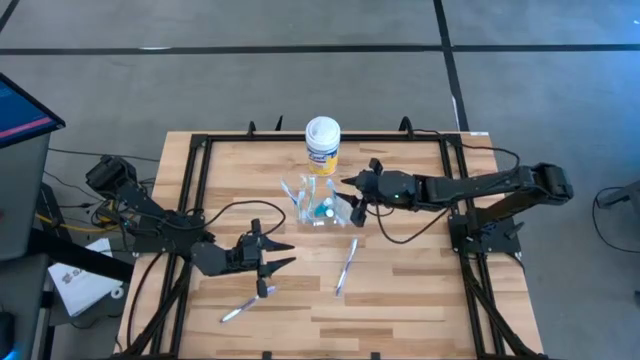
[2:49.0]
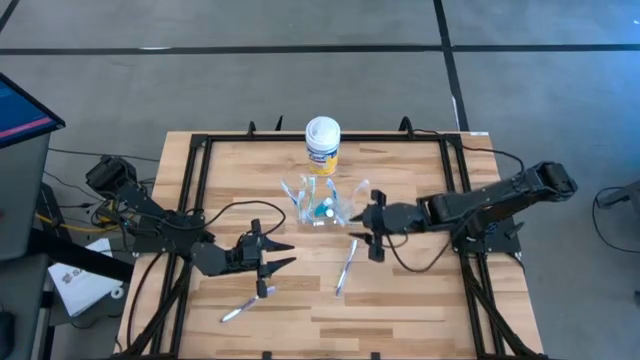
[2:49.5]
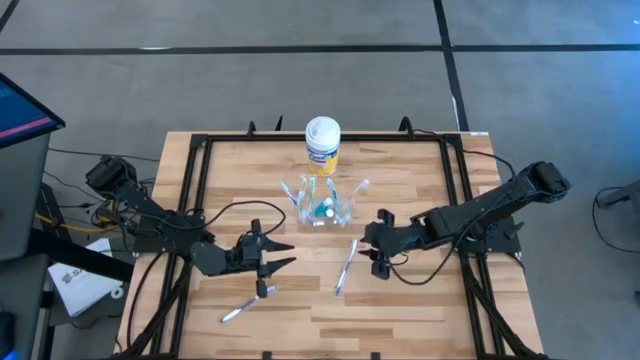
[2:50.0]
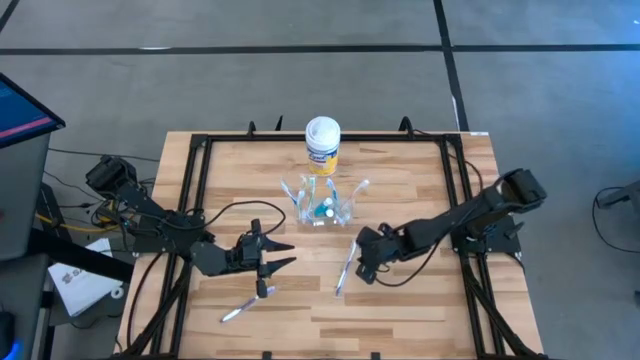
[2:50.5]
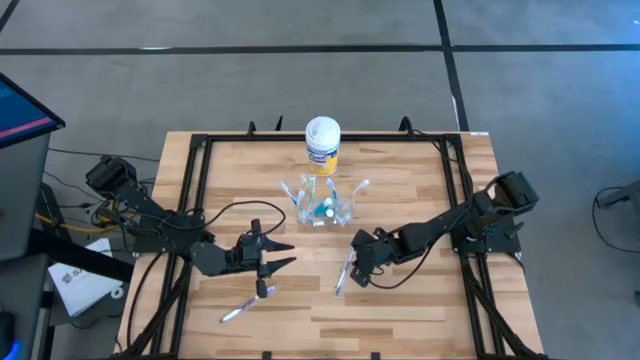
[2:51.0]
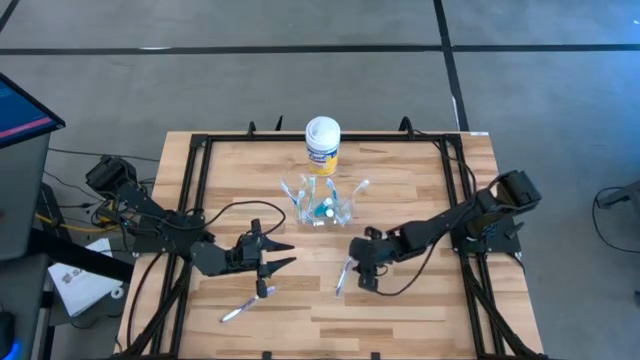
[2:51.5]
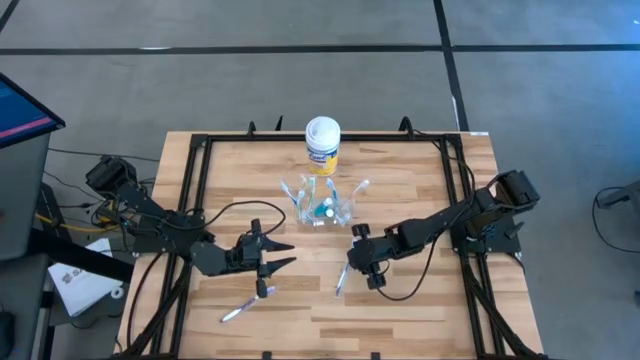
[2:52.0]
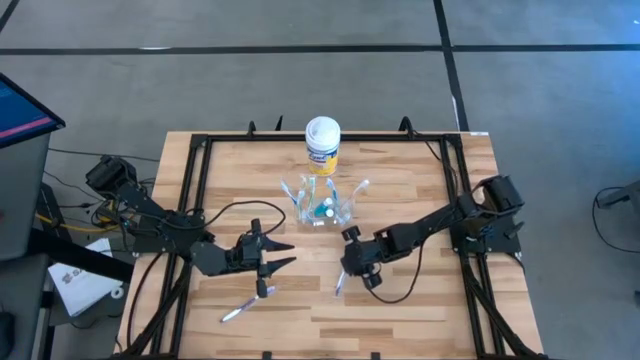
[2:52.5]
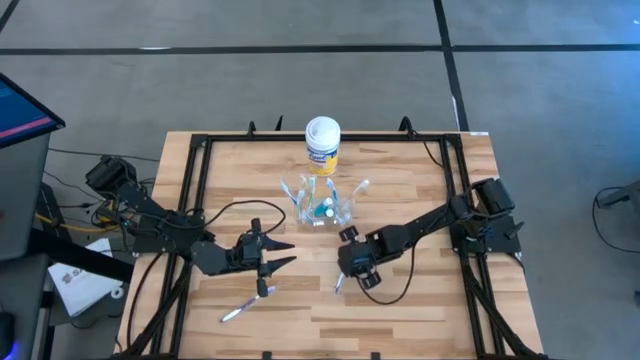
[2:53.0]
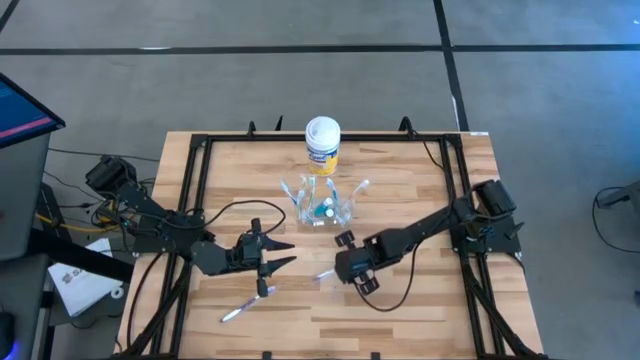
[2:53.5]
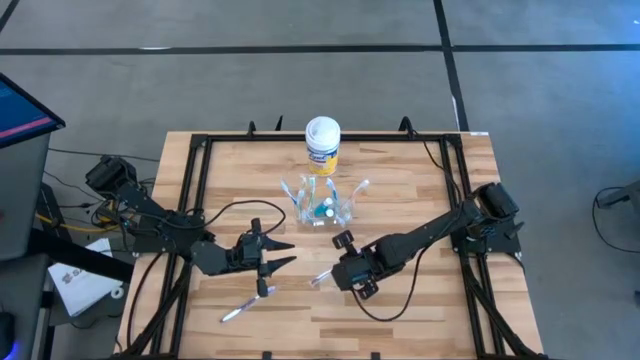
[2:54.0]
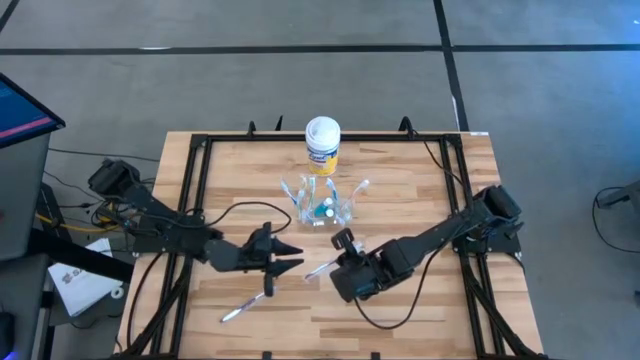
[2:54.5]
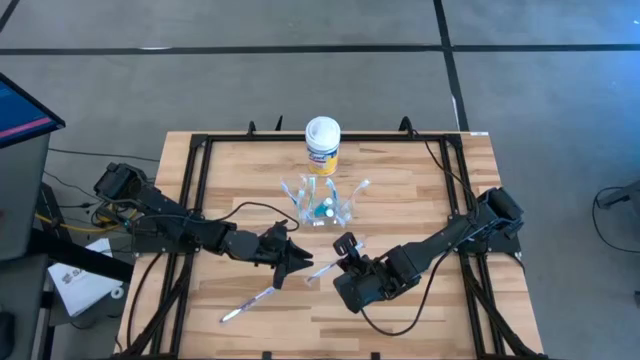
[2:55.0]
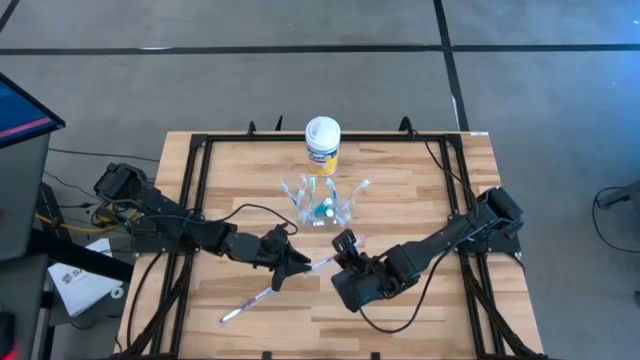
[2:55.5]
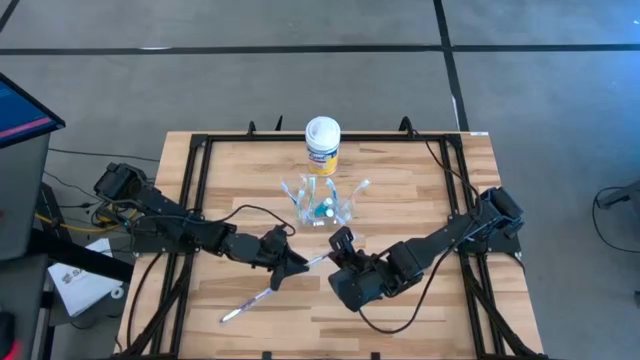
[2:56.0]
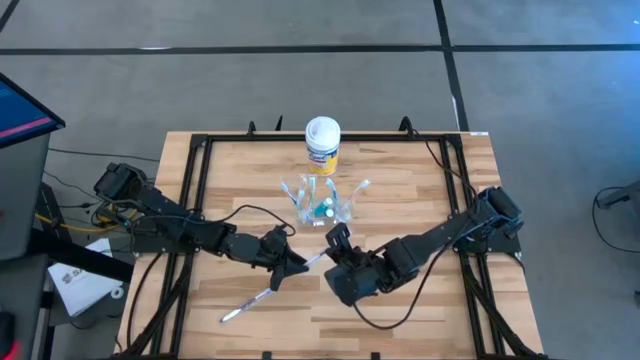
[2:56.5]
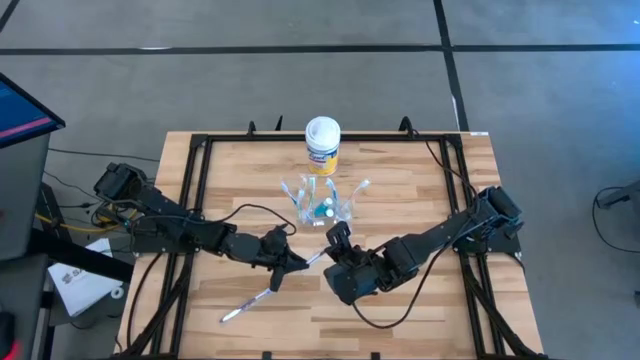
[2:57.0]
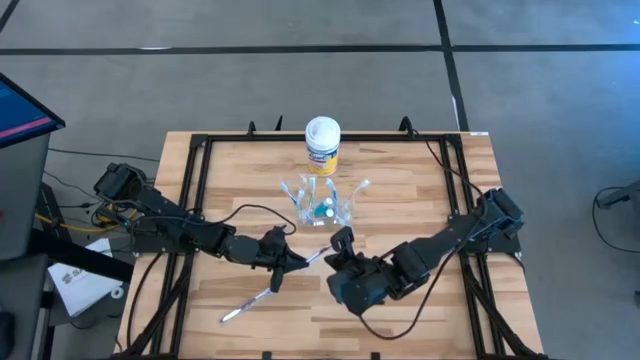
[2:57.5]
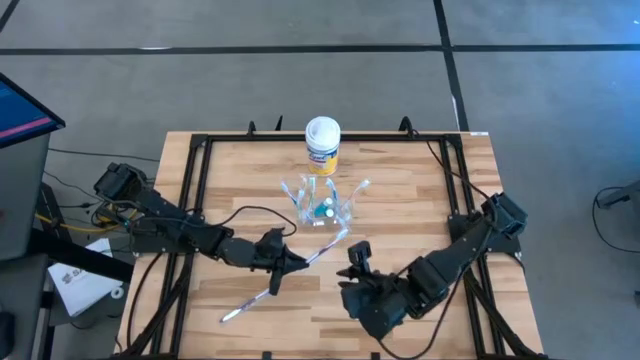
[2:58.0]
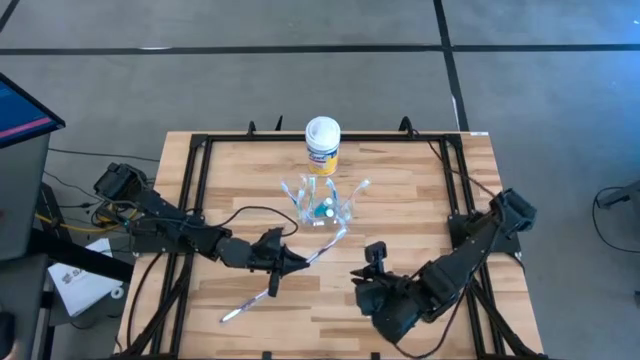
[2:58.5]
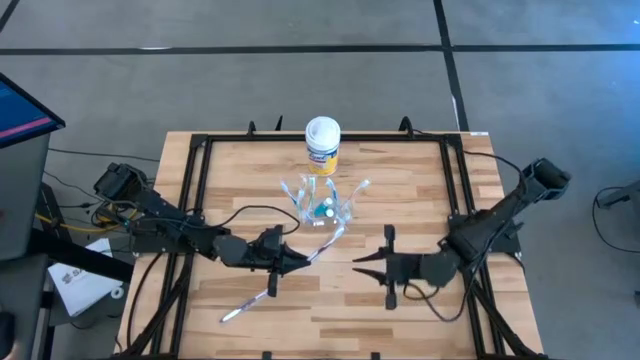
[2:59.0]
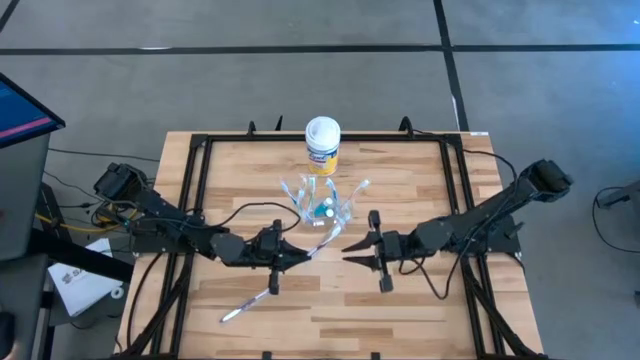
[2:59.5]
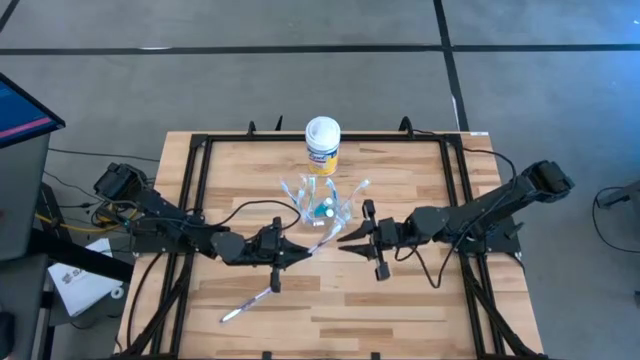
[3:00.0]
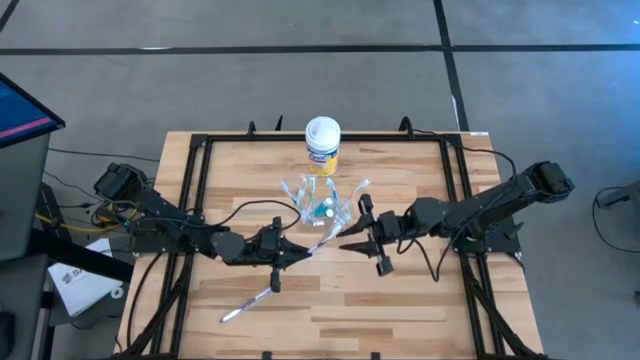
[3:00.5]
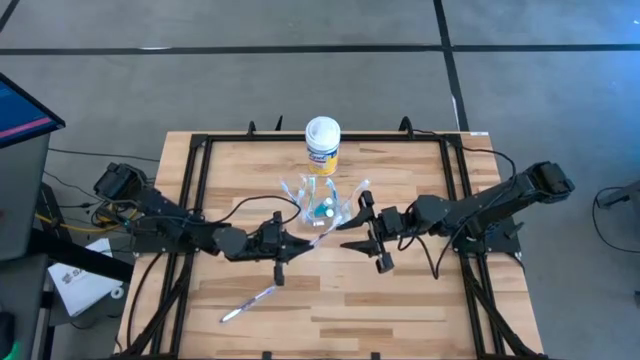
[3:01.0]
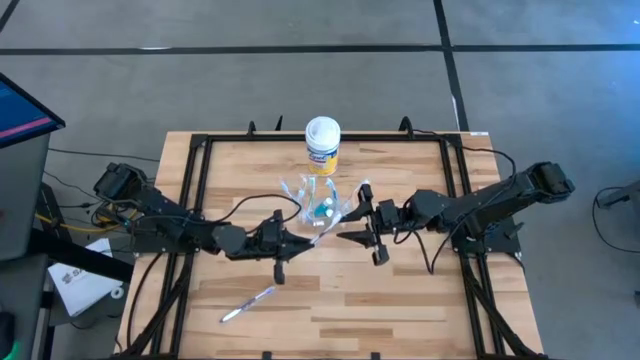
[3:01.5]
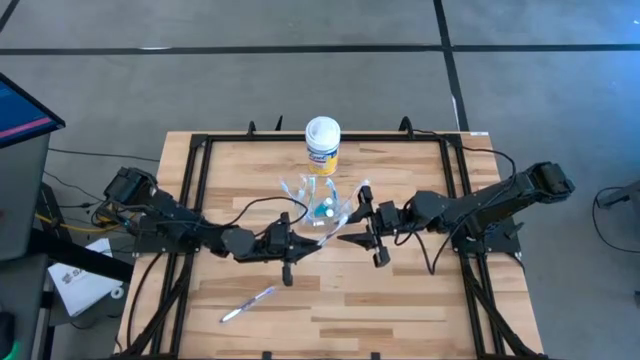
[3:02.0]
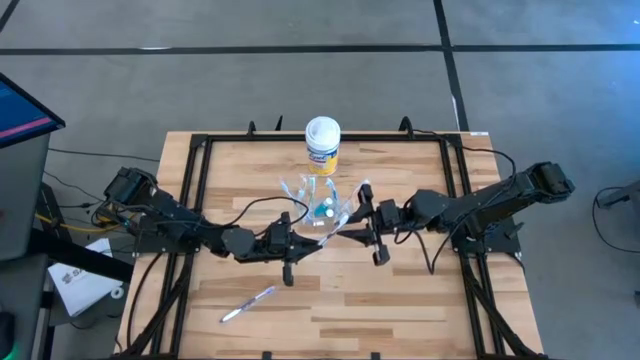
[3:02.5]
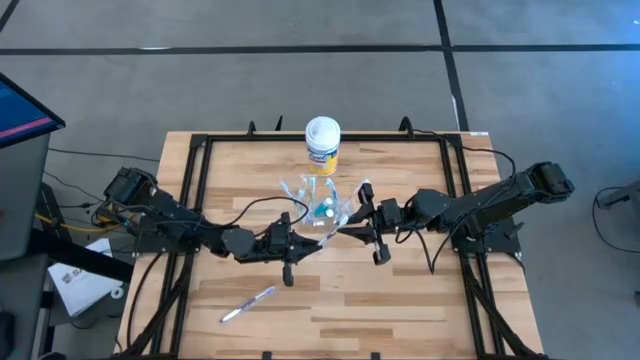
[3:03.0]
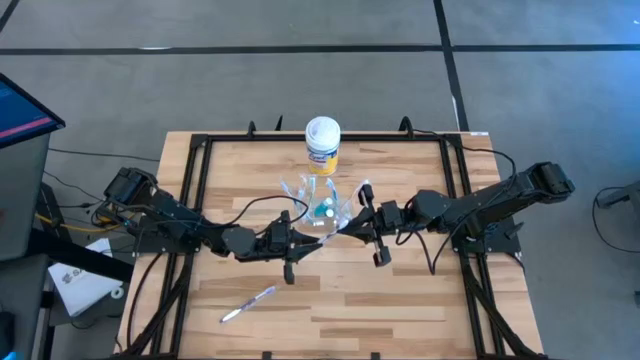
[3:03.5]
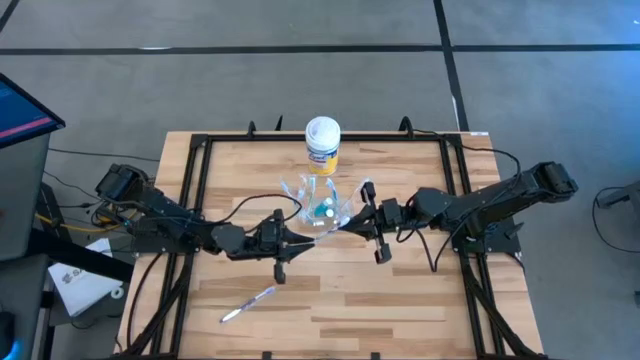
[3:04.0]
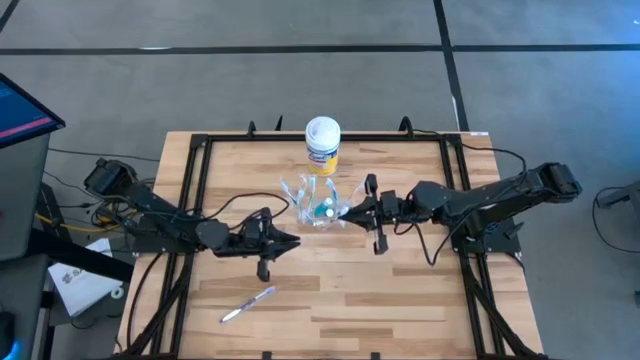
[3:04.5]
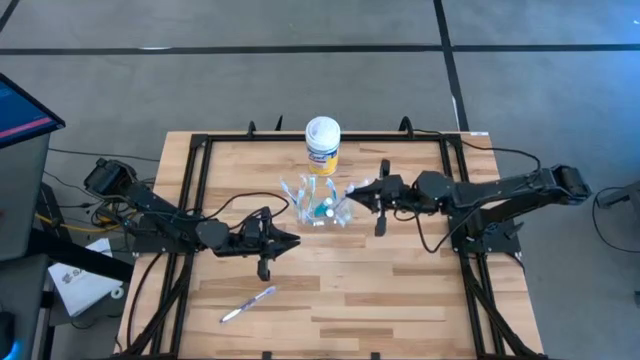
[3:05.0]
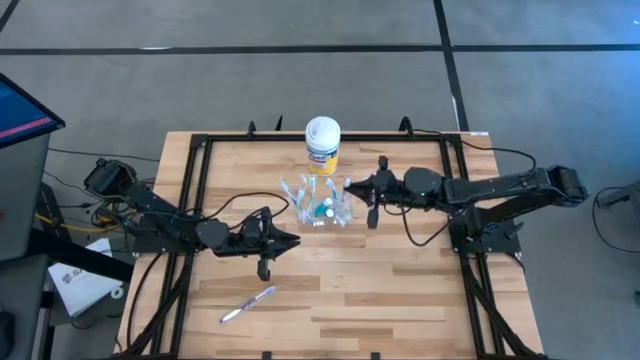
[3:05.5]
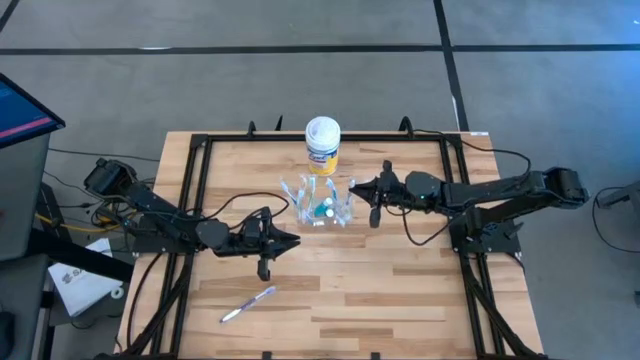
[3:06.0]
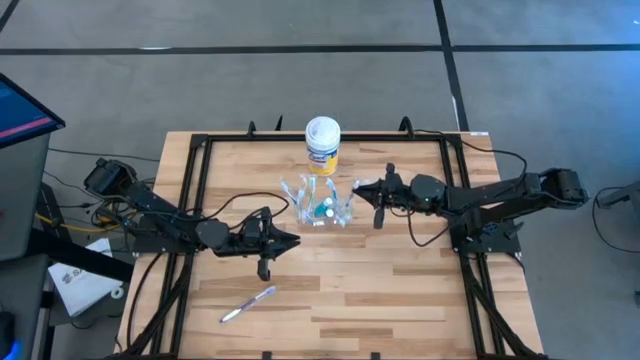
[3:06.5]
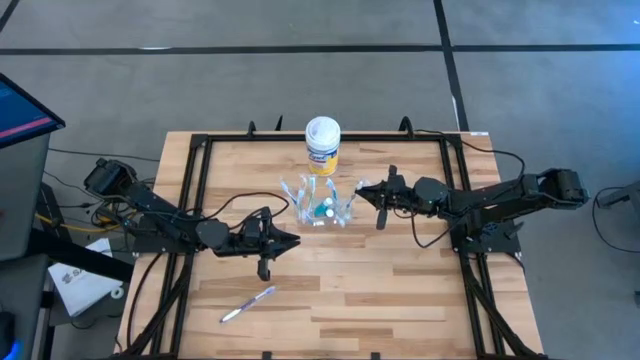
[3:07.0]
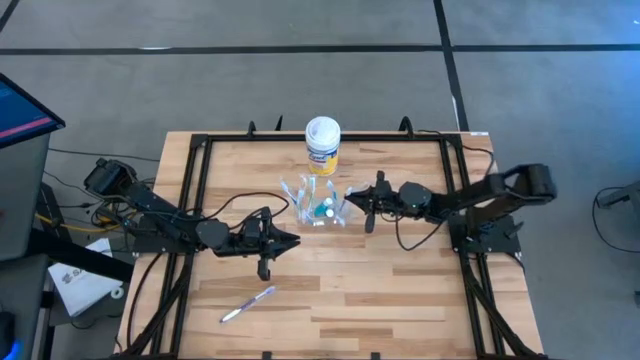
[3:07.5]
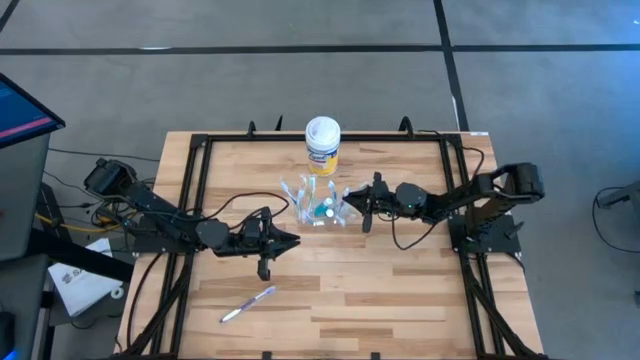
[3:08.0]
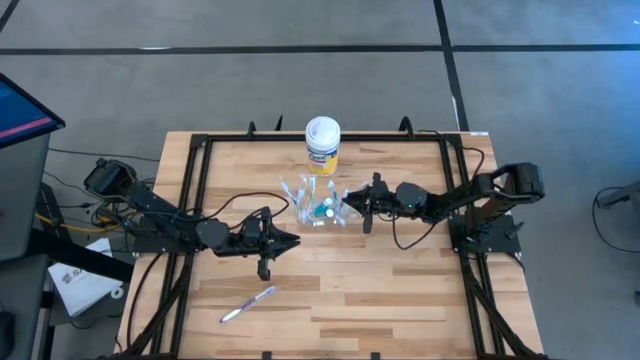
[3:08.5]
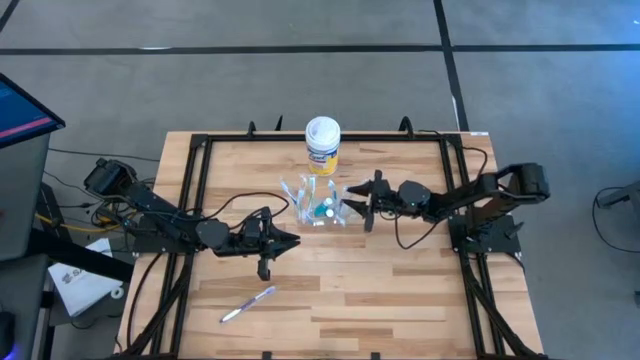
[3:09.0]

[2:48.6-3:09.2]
Task: Pick & Place toothbrushing station
Put the top purple toothbrush into the transparent organizer

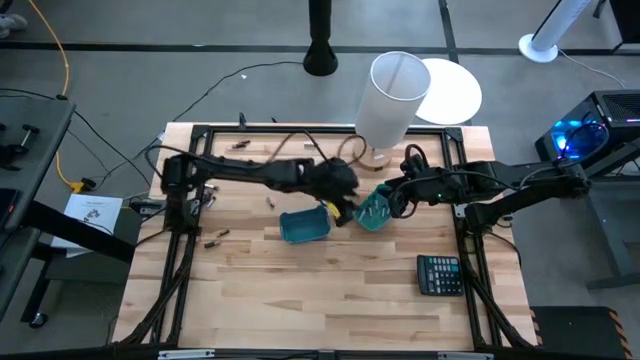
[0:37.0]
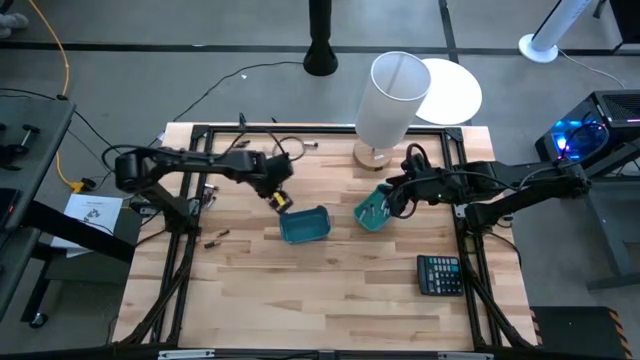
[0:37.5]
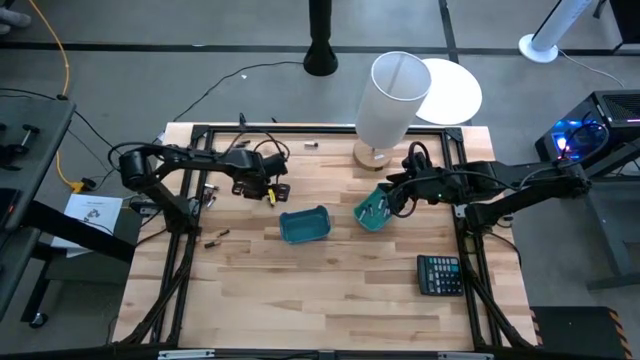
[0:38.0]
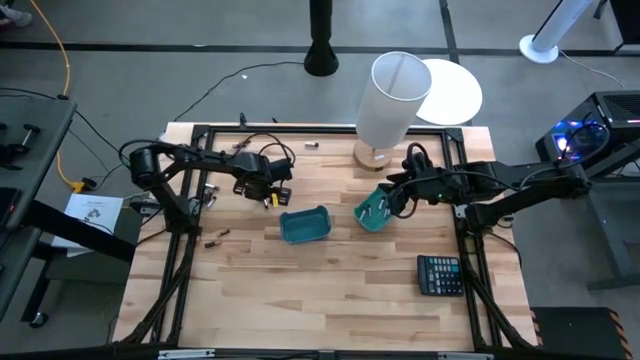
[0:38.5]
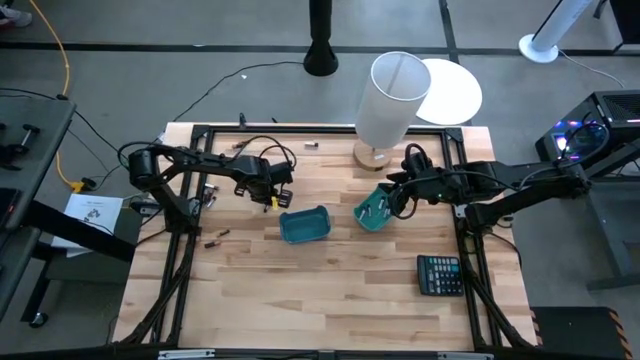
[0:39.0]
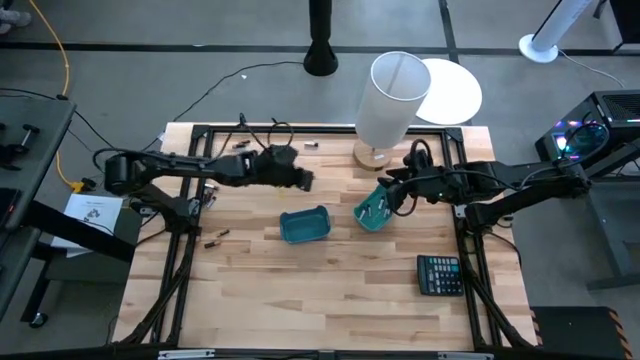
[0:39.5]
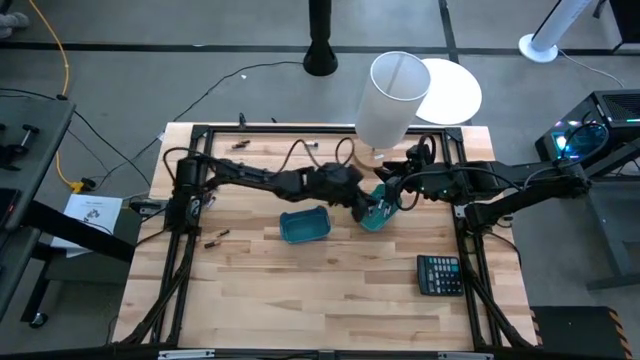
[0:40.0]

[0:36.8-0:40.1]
Task: Sort batteries
Put the silver battery into the green bin
